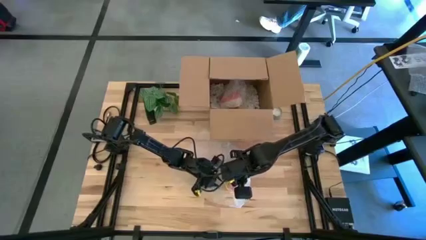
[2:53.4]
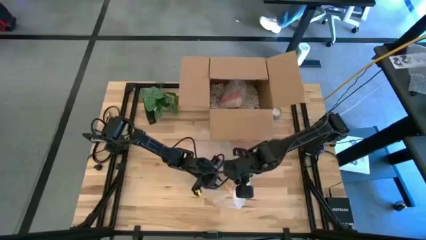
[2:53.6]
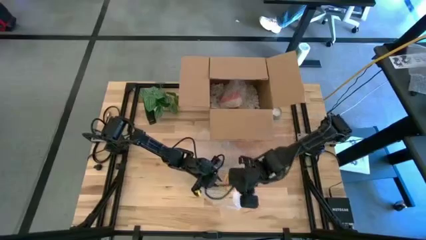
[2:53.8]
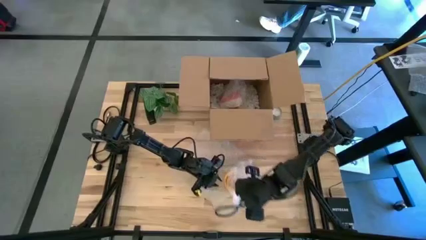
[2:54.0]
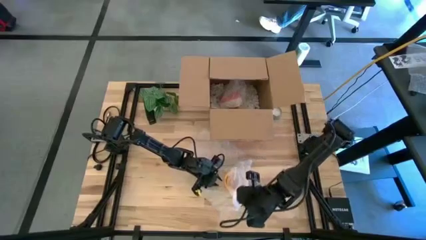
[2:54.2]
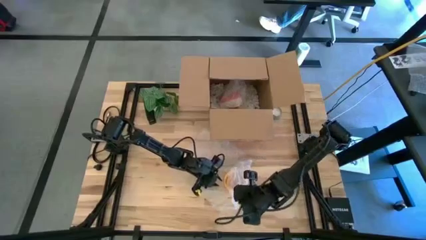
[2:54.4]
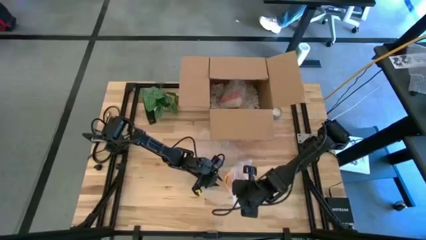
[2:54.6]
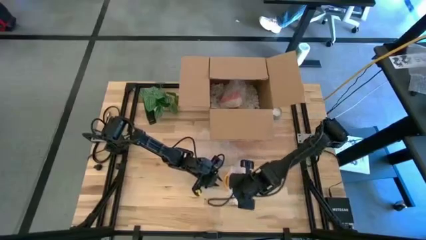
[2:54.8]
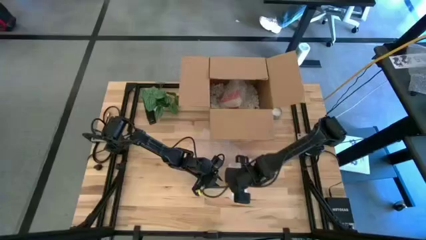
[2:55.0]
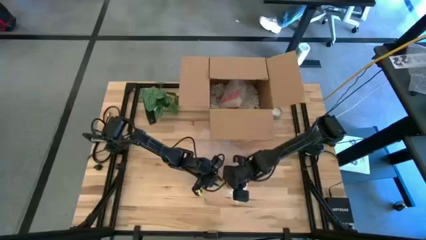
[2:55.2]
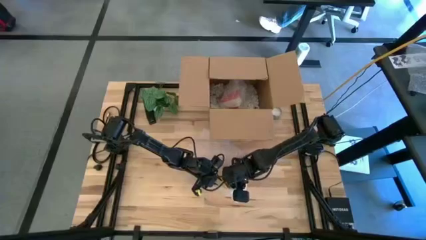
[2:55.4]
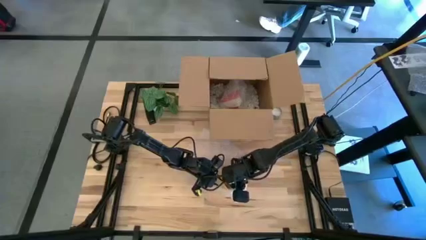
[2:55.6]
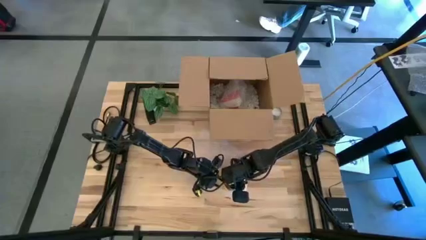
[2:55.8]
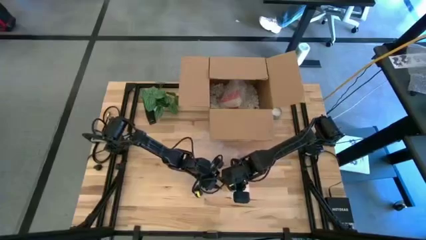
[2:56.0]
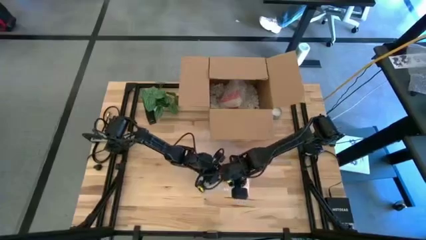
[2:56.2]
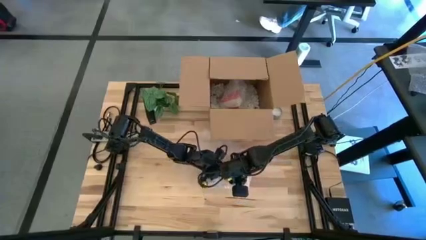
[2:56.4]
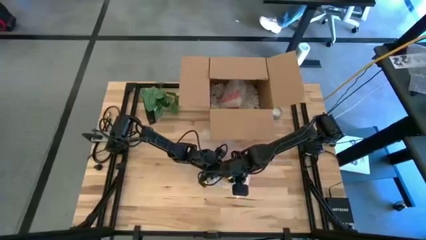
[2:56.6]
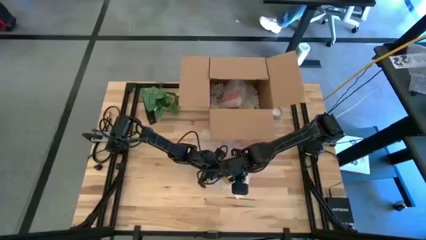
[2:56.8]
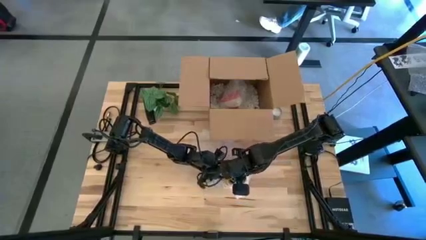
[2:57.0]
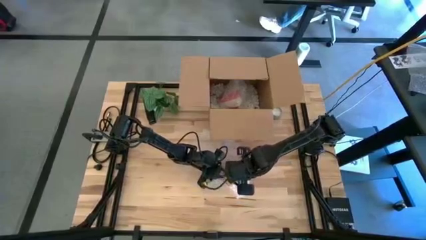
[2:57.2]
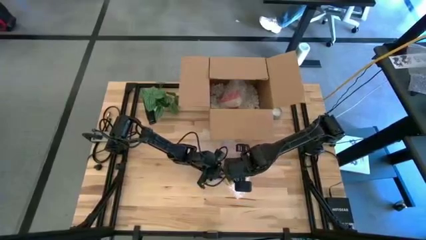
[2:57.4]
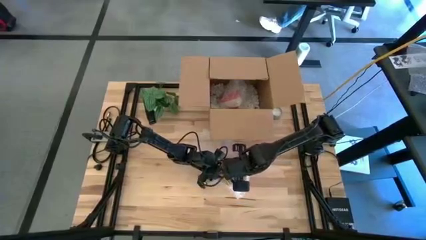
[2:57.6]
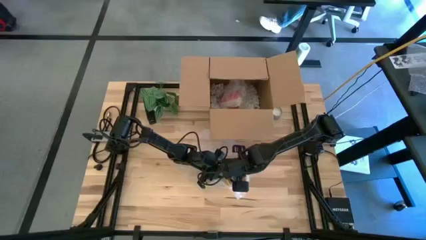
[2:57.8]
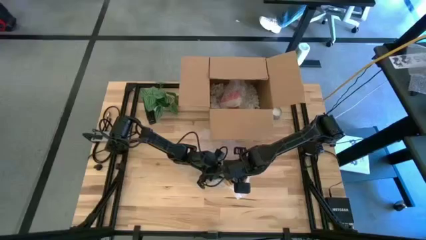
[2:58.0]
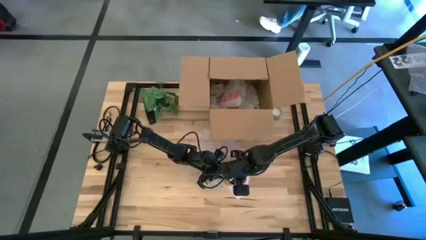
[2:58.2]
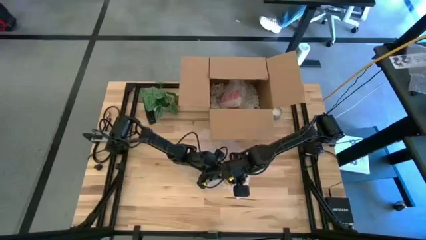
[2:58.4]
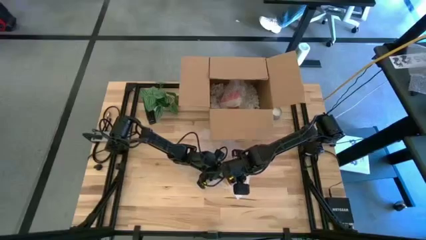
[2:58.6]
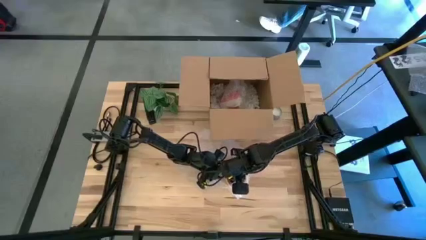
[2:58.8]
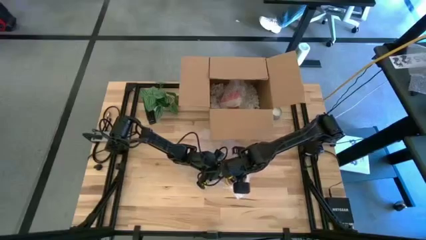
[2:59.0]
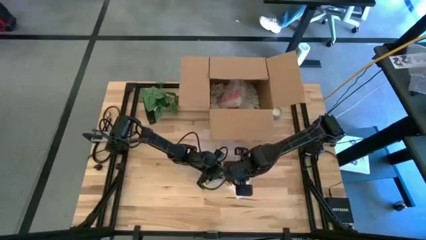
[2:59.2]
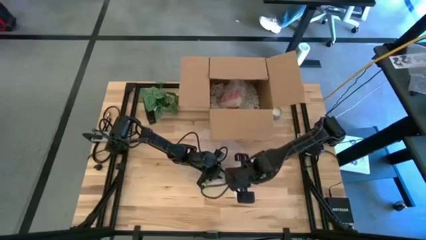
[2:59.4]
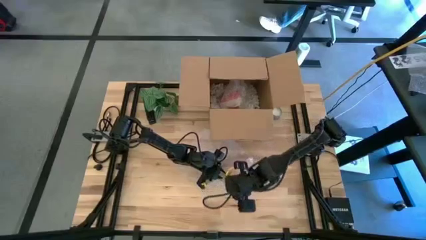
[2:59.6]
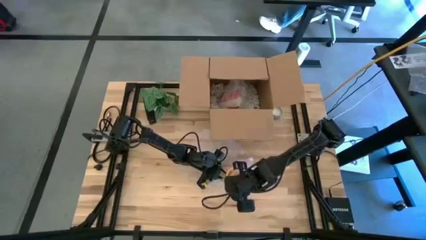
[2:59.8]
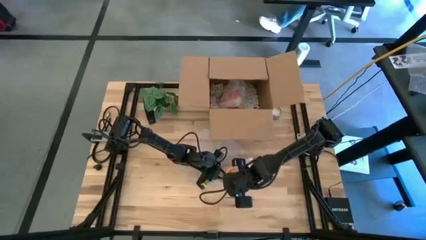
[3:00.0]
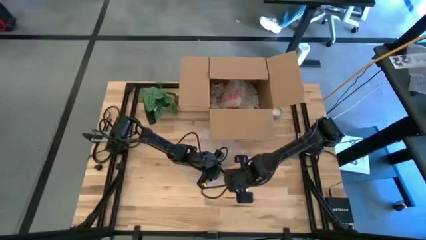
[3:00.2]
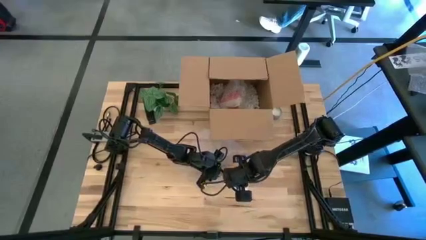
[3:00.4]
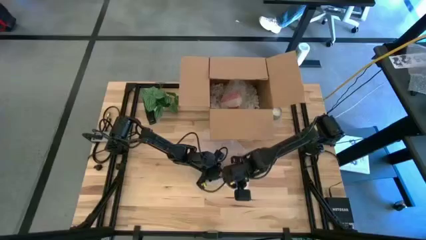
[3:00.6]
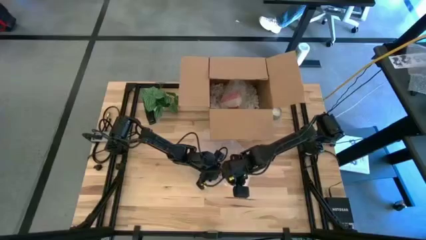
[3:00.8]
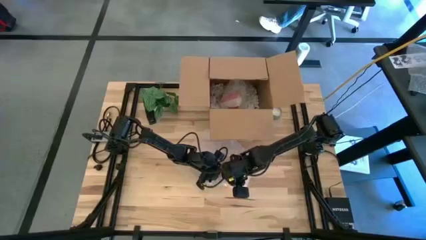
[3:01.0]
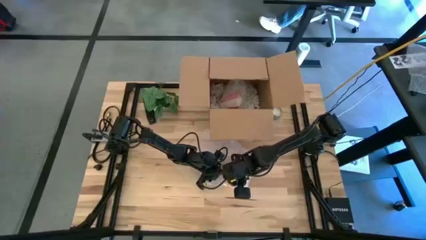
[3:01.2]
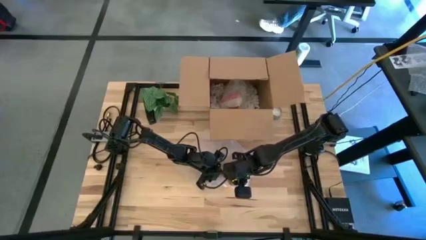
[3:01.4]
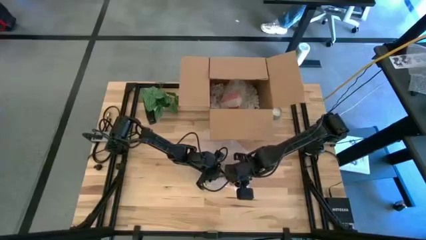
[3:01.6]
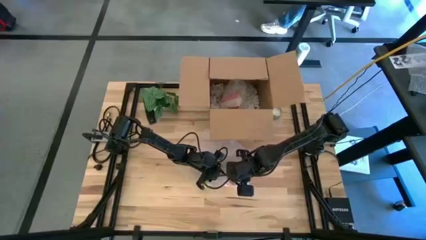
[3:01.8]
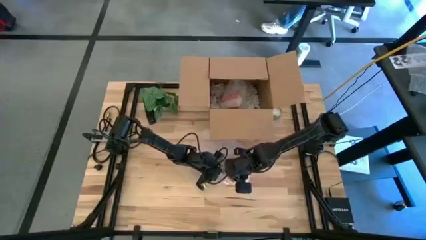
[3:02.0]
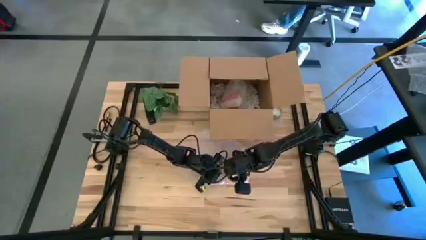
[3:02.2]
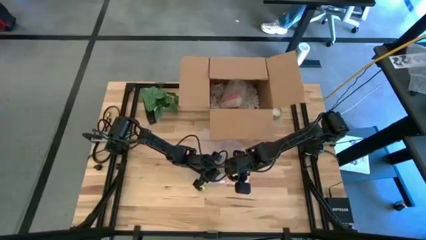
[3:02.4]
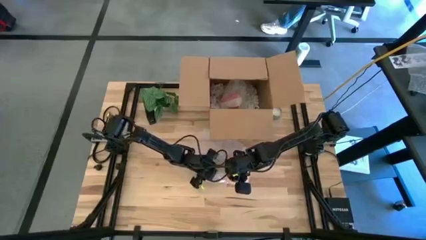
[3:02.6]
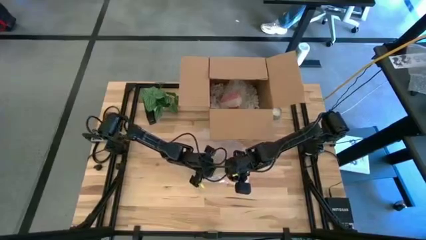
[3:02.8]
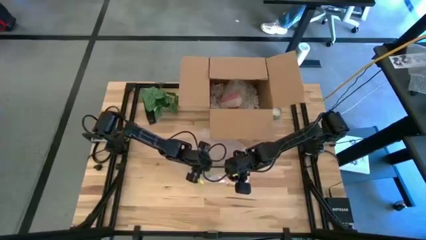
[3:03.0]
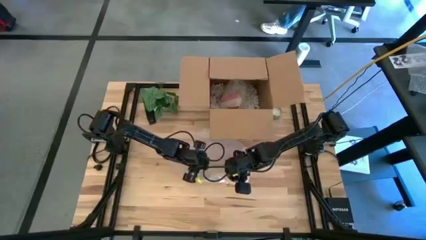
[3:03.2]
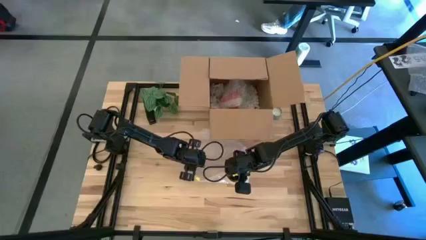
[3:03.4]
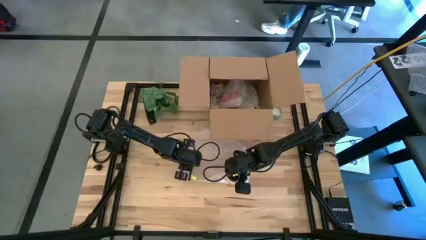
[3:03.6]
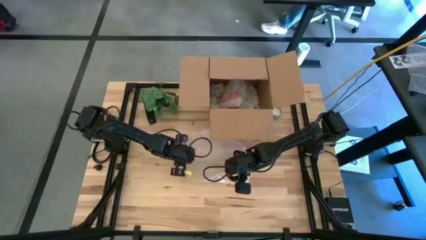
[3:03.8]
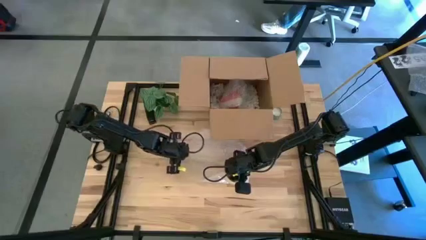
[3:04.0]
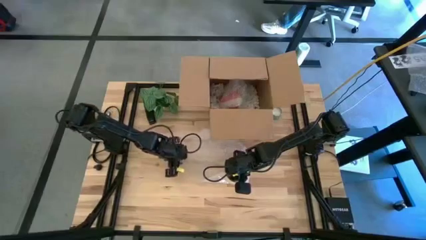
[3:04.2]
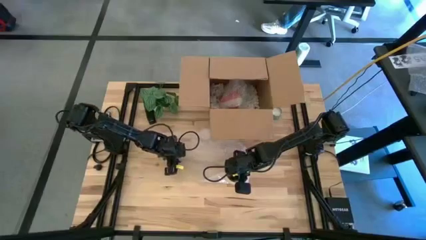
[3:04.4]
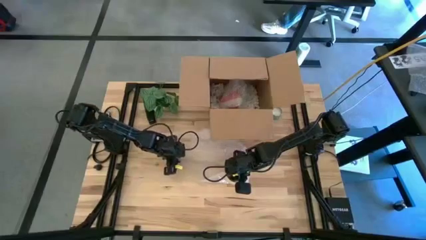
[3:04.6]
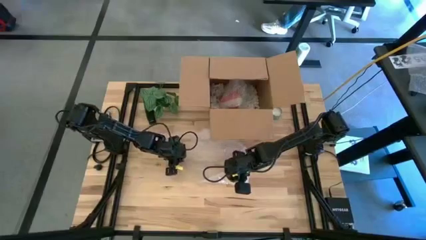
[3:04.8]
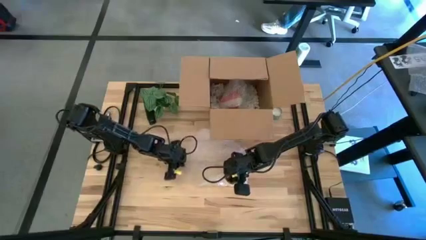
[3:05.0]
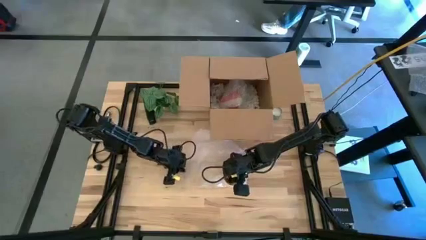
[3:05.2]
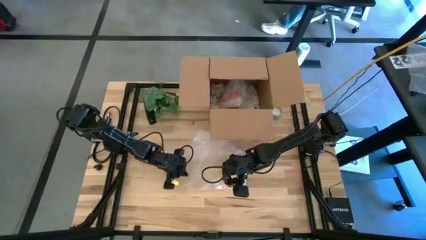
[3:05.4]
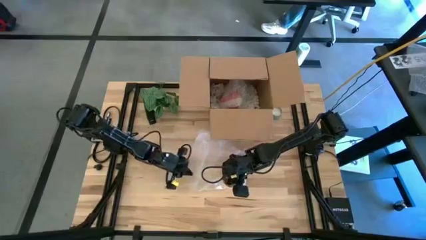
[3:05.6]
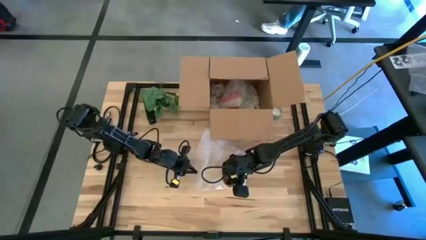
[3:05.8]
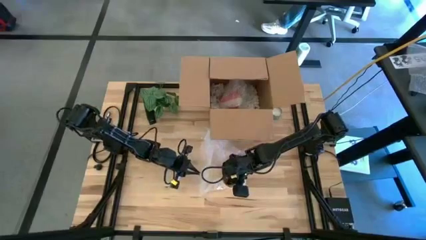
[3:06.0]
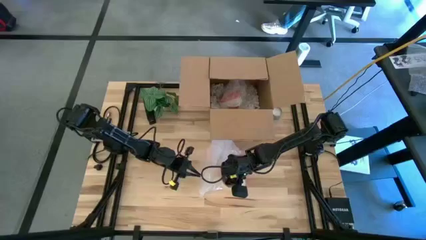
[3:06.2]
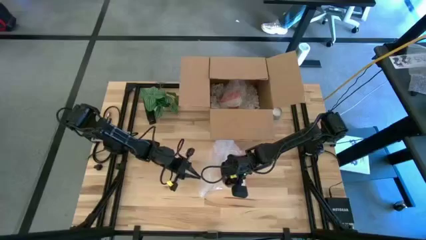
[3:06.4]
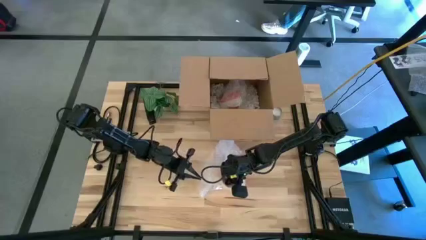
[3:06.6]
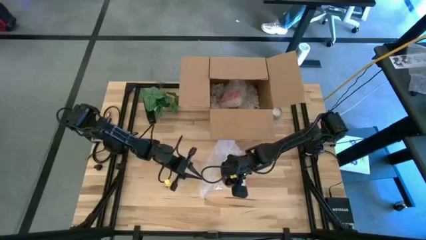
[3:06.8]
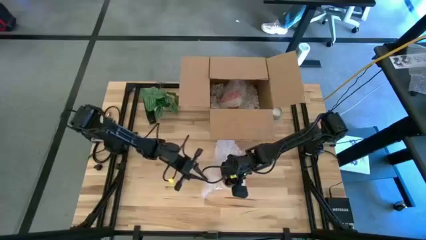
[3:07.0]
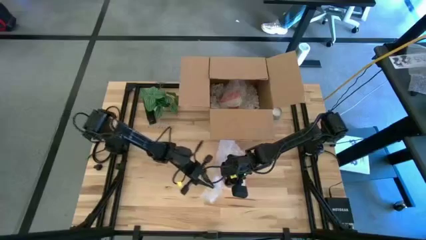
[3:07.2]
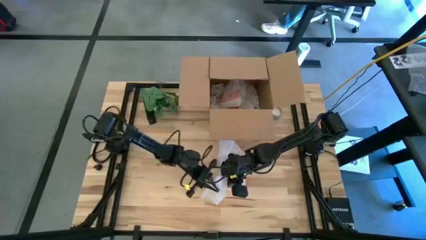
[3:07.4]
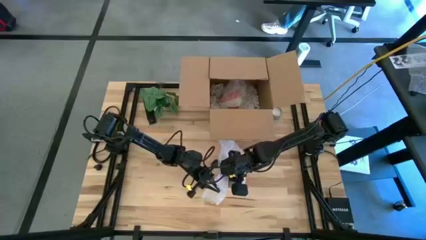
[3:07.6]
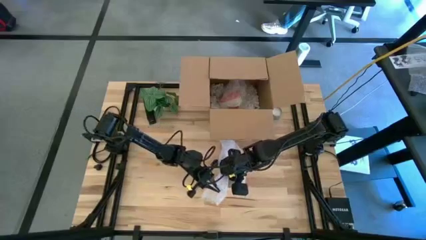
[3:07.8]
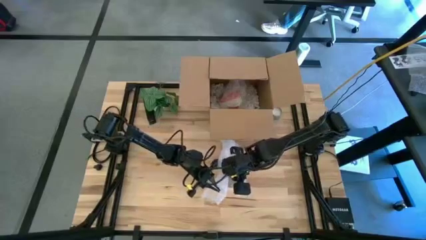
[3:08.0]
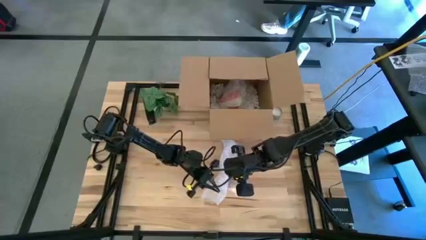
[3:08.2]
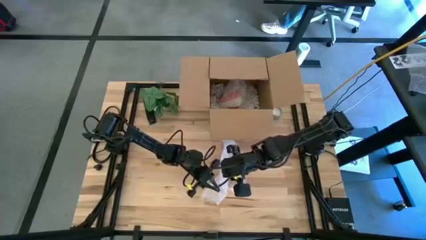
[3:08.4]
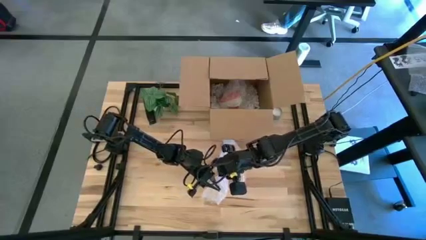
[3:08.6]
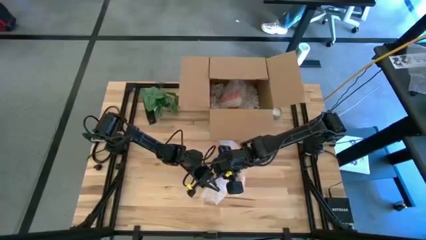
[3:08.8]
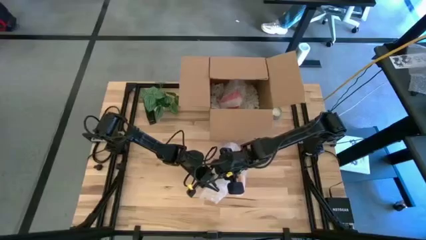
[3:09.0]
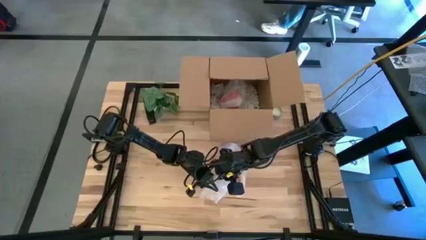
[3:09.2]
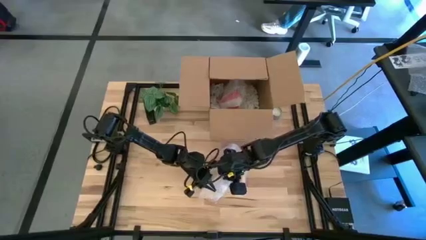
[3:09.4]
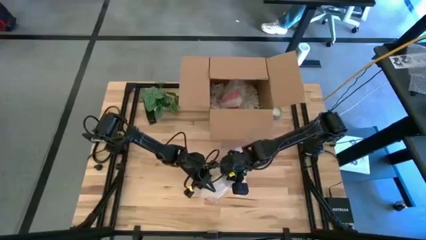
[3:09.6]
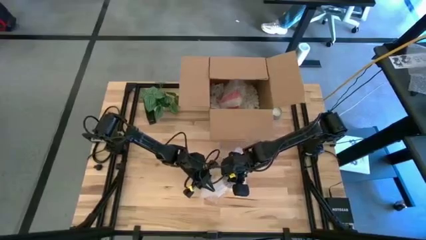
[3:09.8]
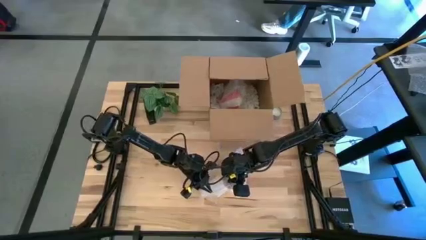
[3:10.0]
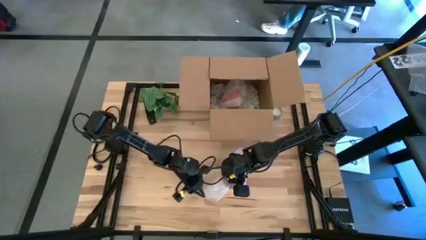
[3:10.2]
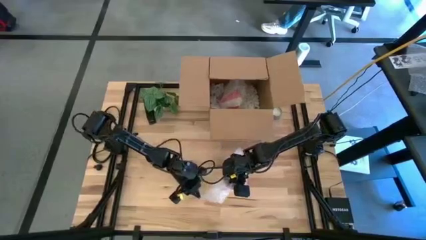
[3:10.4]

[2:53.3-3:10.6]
Task: wrap mug
Wrap the yellow mug with the bubble wrap
